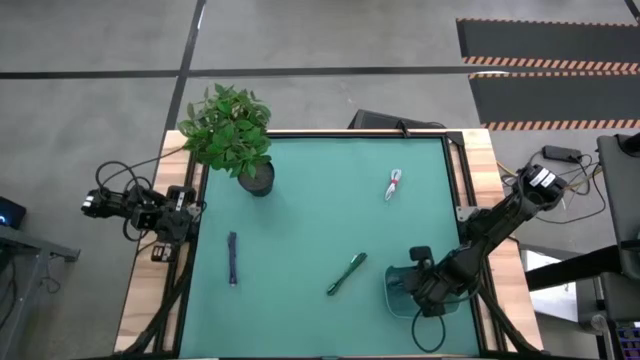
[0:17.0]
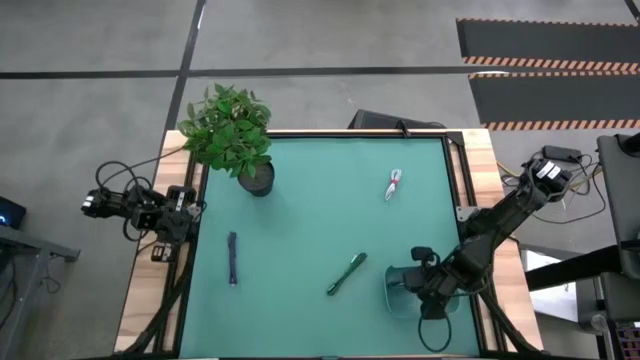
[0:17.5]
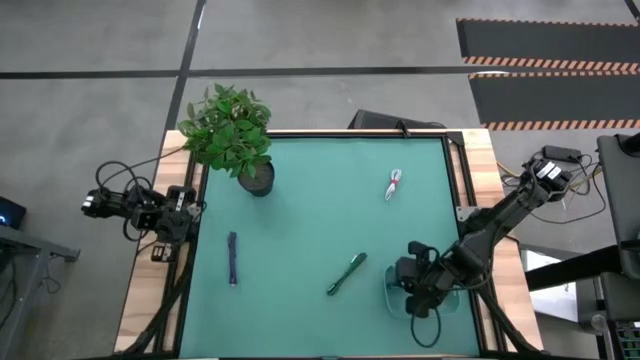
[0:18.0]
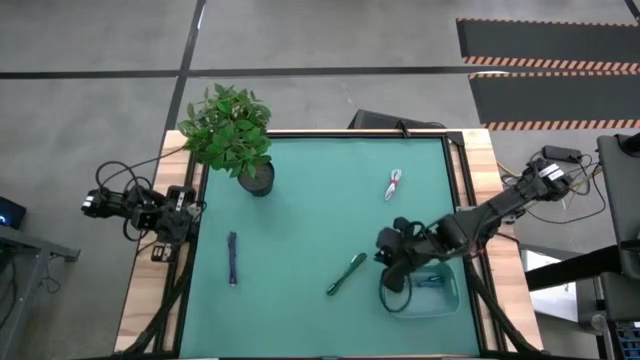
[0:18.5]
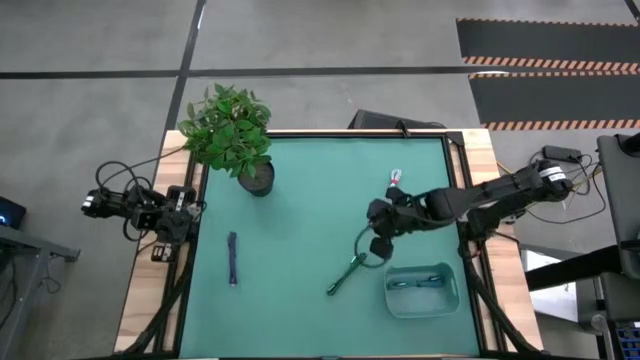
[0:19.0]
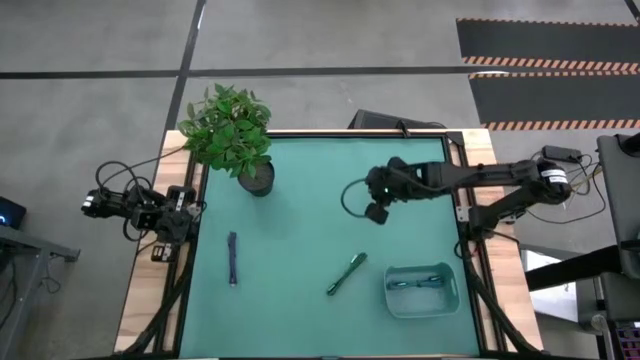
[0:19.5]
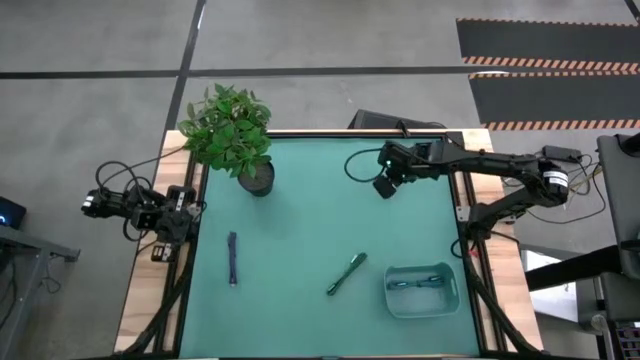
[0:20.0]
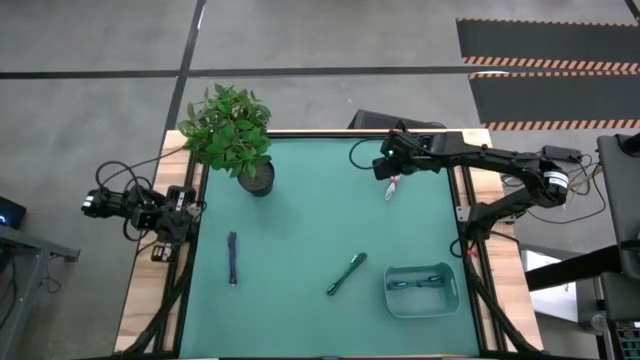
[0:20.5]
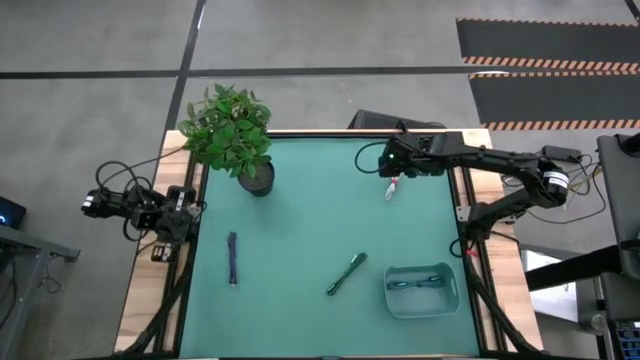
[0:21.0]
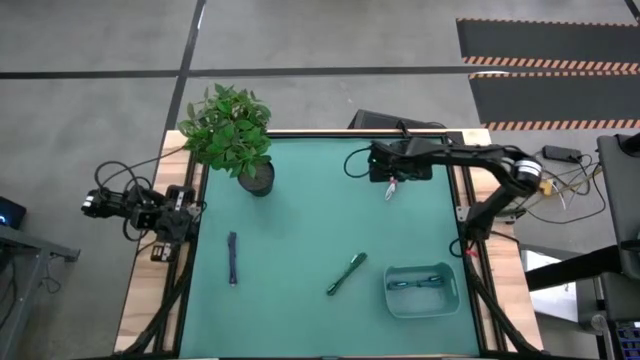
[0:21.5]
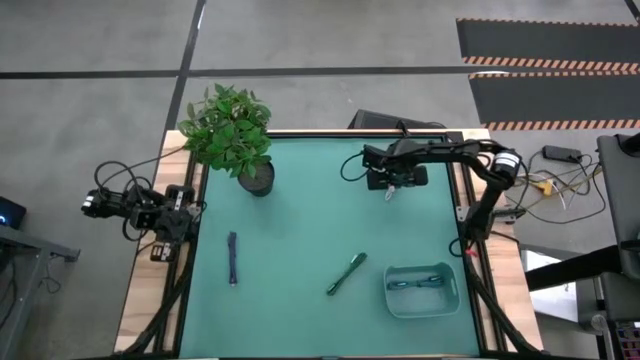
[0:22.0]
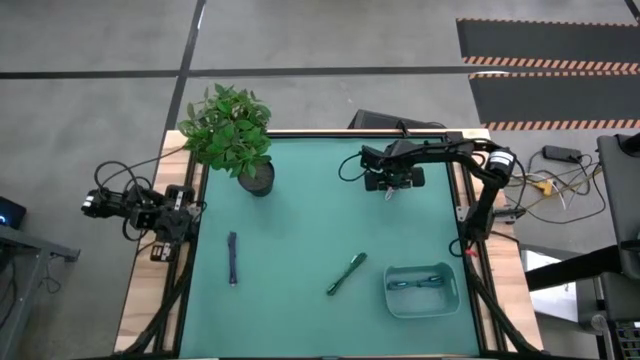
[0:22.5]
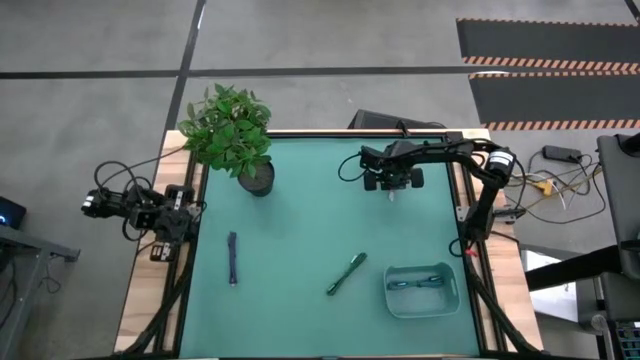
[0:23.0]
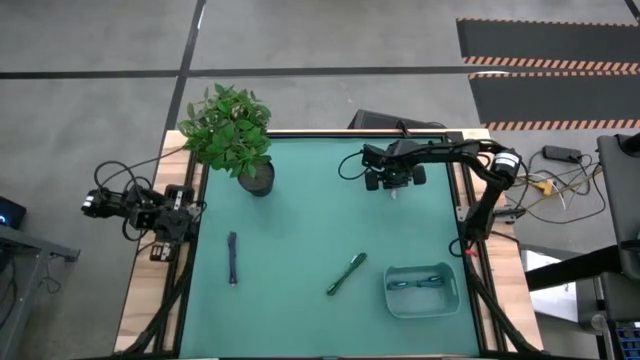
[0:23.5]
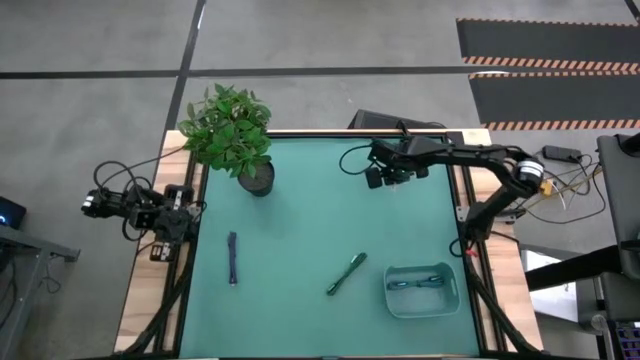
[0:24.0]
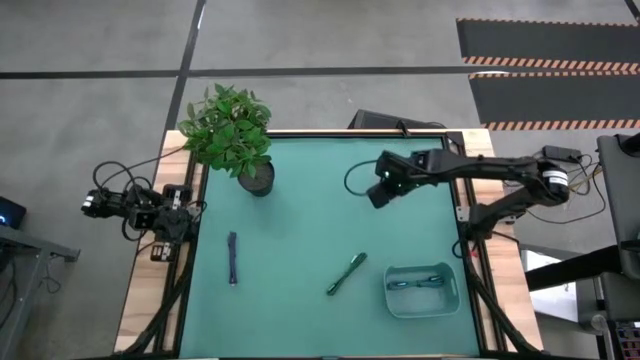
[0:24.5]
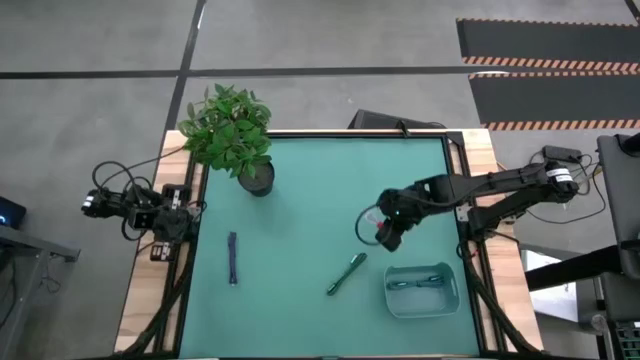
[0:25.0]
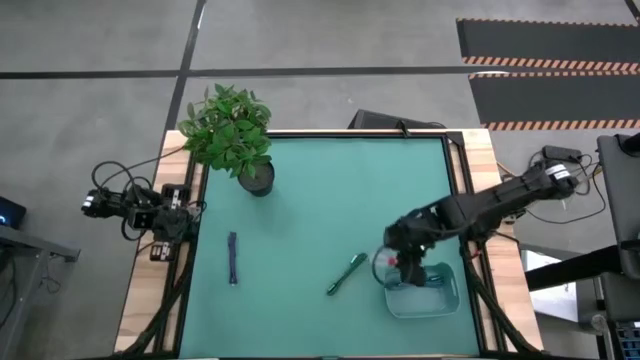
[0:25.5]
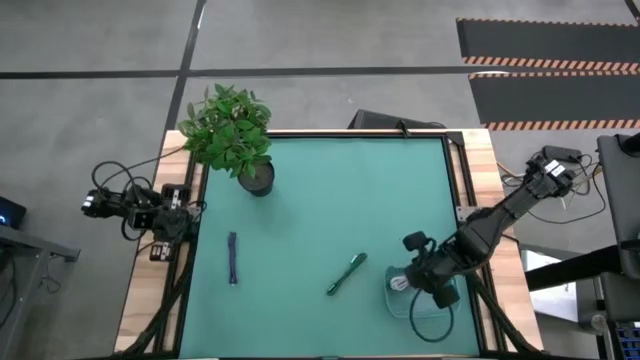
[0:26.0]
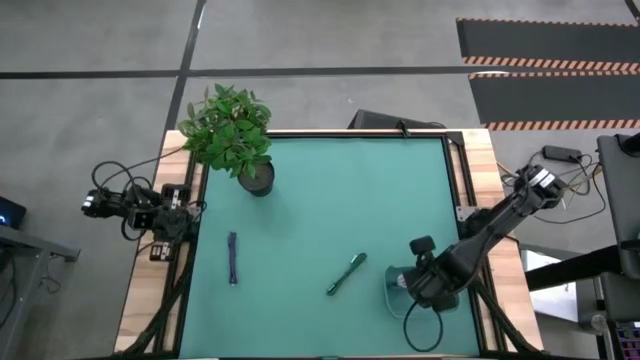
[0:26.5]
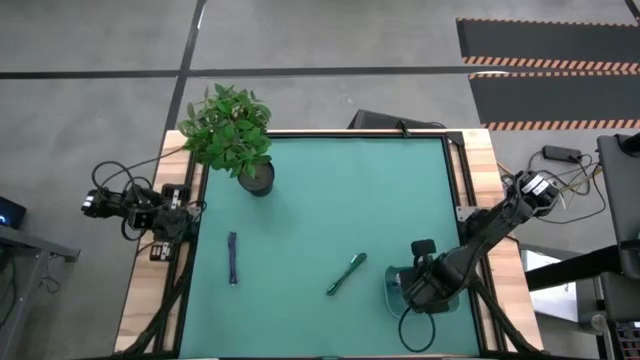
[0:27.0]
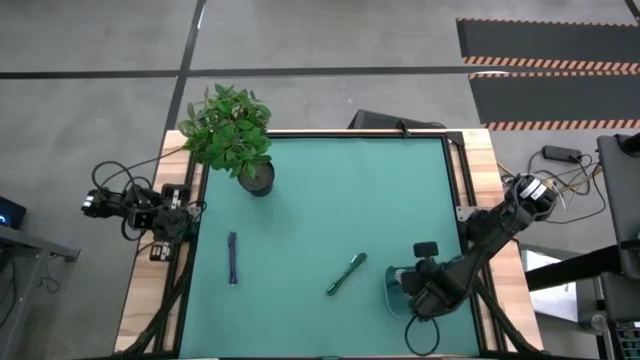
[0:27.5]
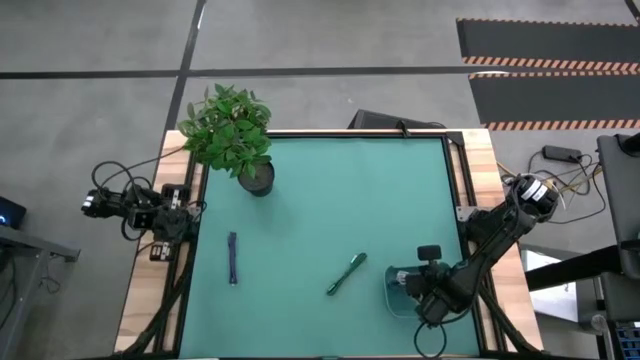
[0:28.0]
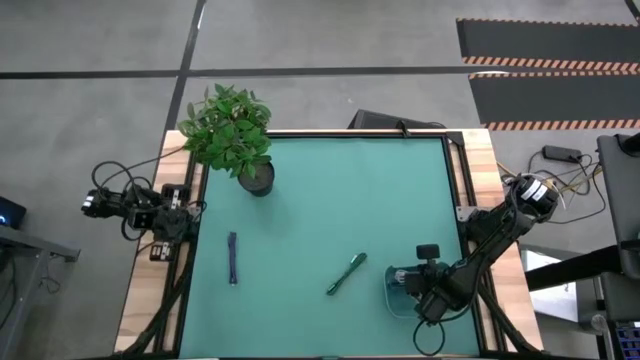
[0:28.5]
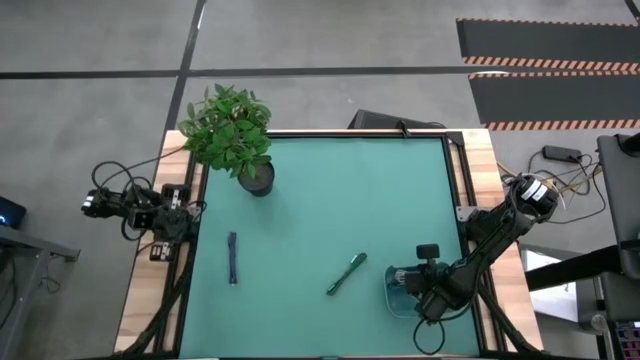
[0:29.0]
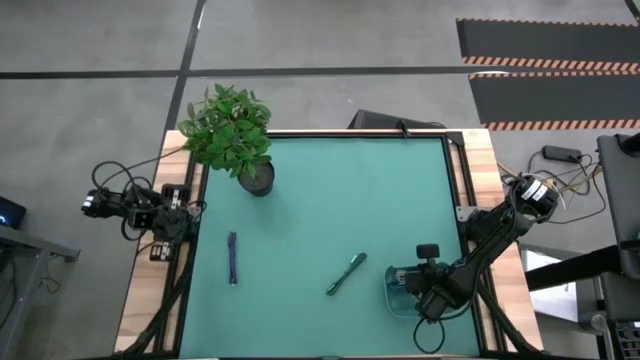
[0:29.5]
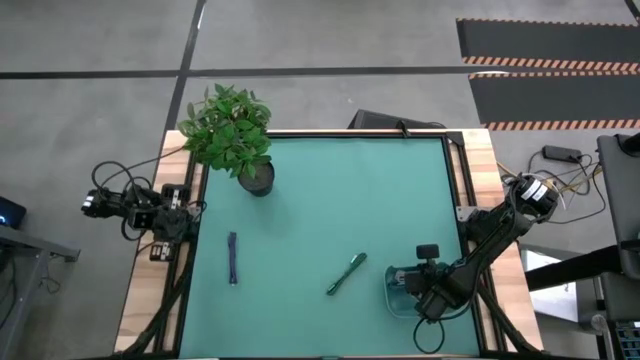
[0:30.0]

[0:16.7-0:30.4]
Task: Pick and place USB-C Cables
Put the pink charger cable into the green bin

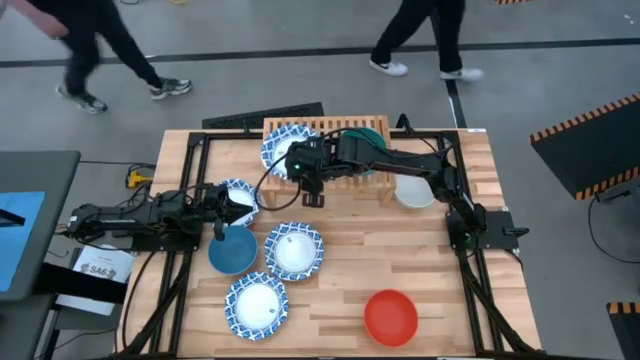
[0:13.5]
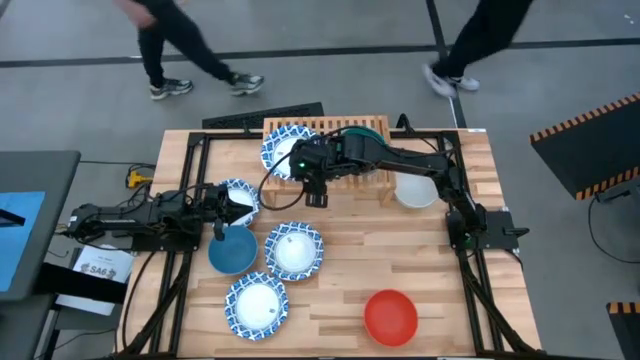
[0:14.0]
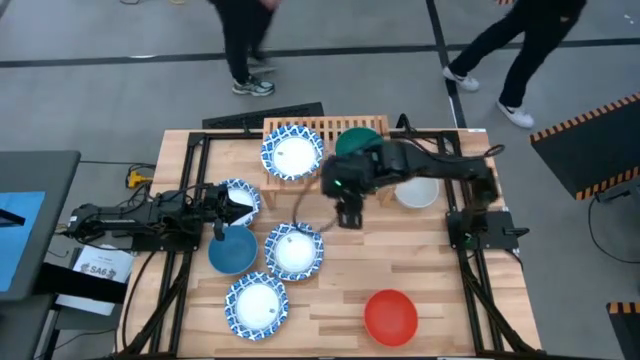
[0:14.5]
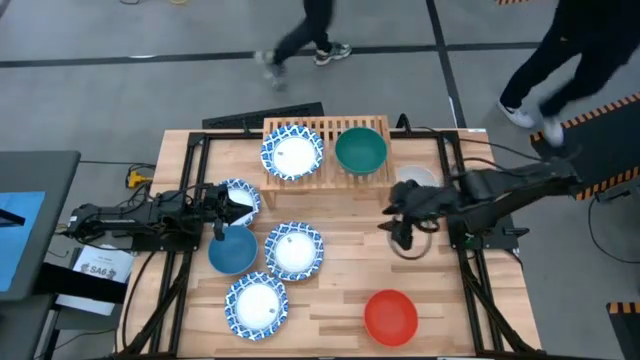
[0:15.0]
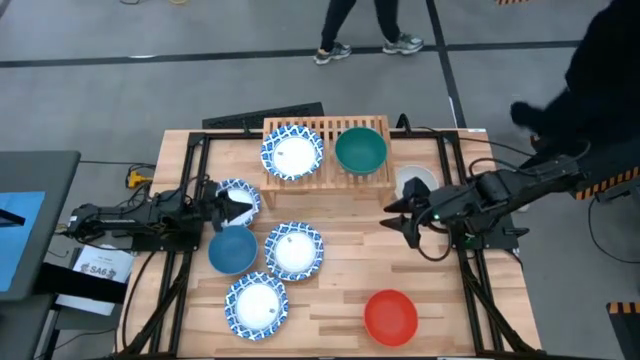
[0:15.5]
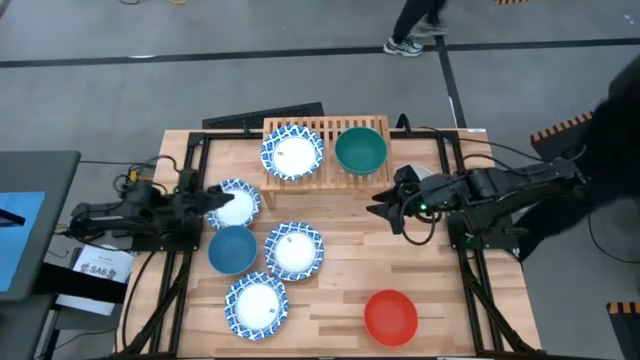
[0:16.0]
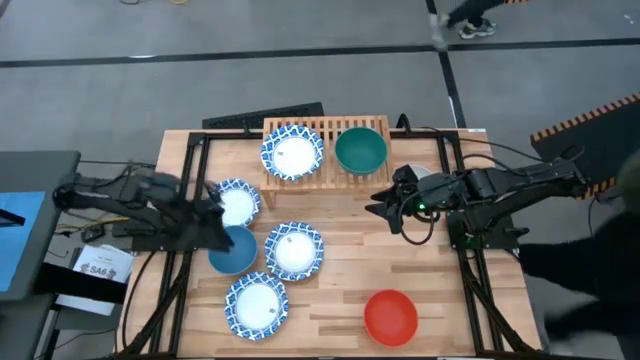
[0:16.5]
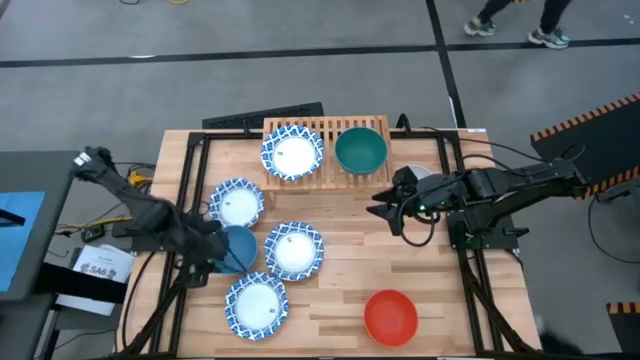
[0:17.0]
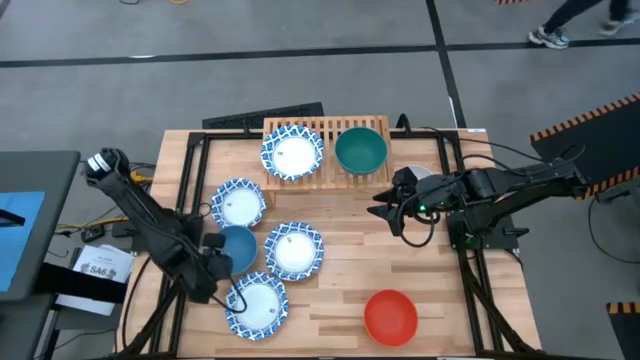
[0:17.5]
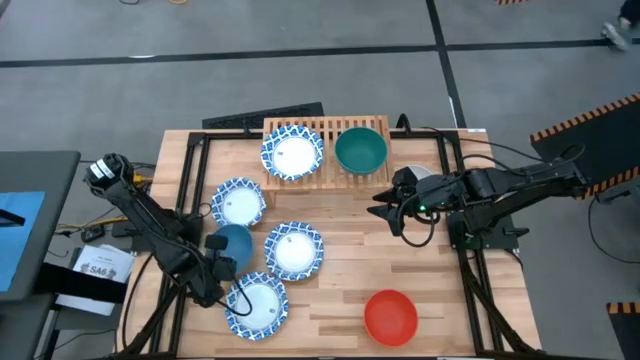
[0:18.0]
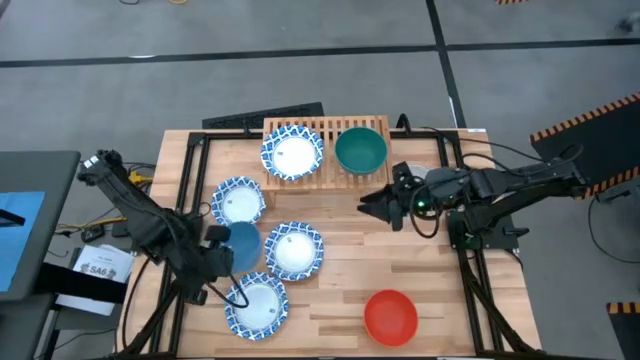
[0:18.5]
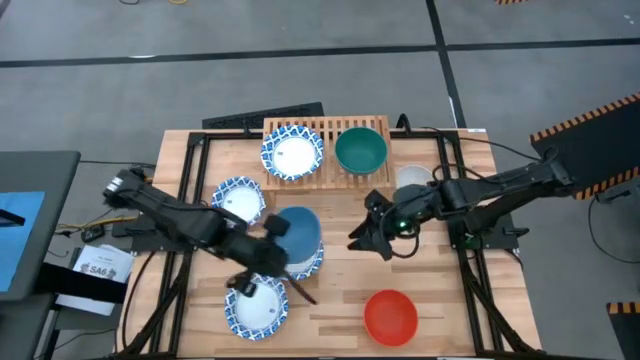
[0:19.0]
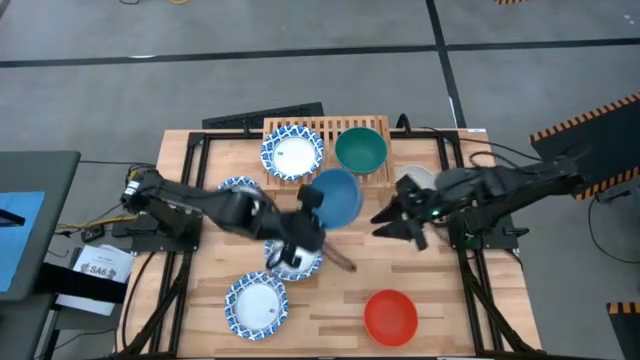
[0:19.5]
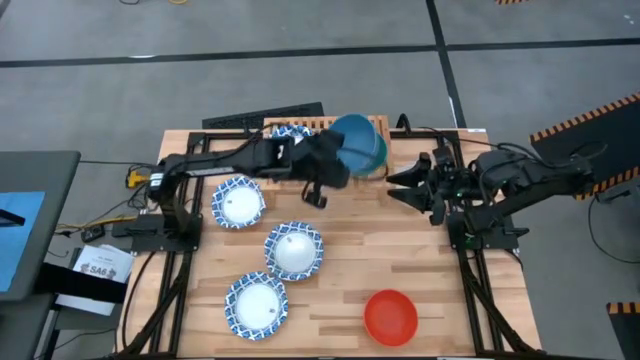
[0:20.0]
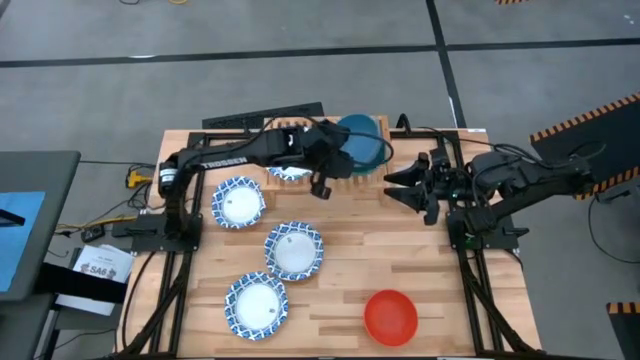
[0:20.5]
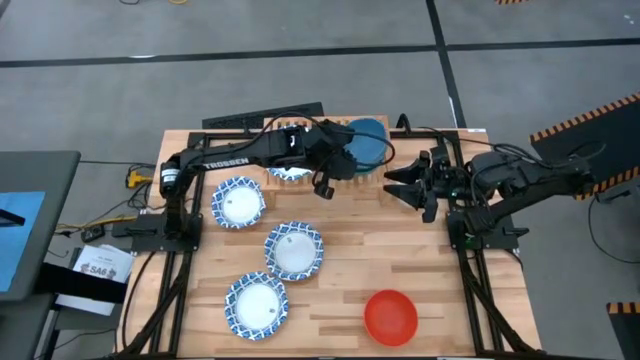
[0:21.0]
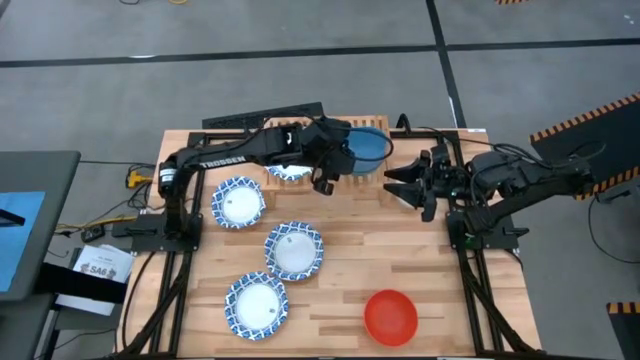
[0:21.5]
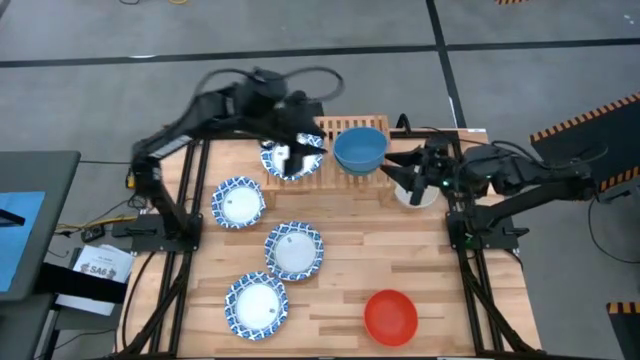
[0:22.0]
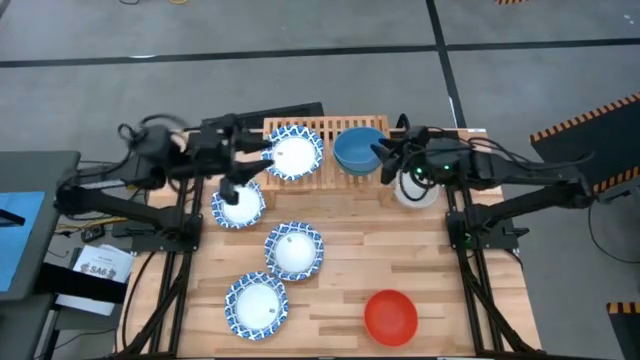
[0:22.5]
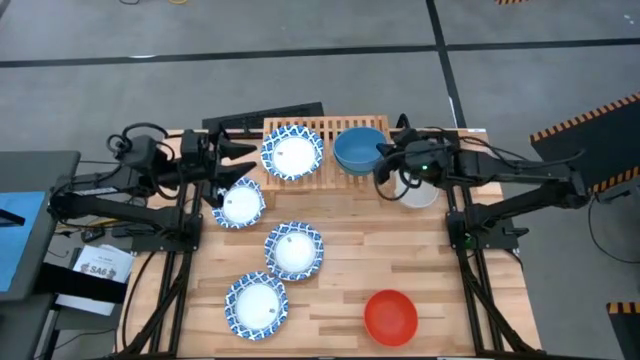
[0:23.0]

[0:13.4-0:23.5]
Task: Place and stack bowls onto a shelf
Stack the blue bowl on top of the green bowl on the shelf
